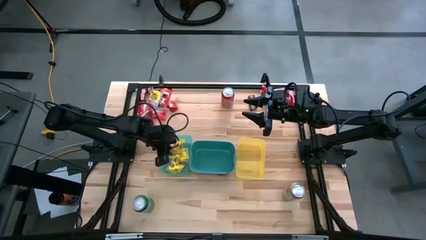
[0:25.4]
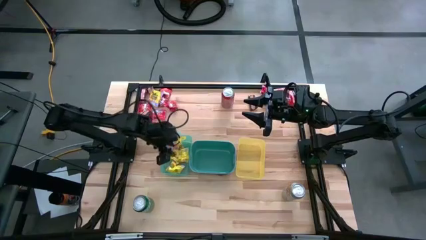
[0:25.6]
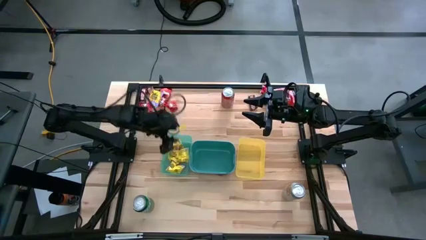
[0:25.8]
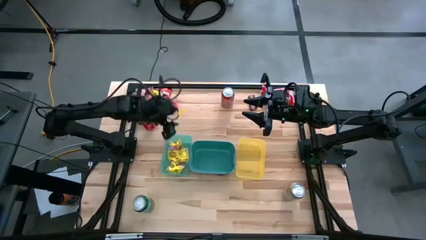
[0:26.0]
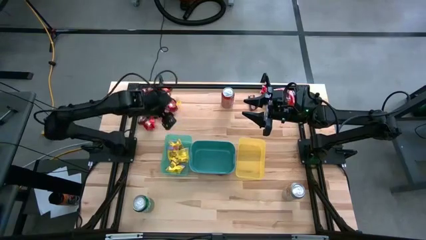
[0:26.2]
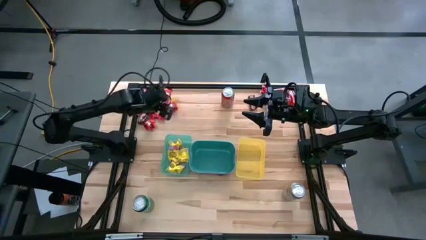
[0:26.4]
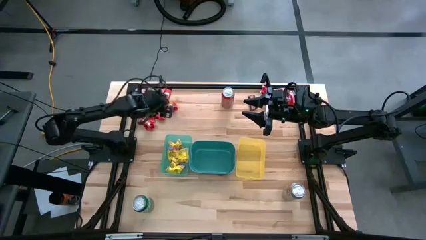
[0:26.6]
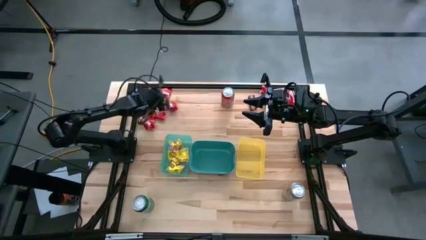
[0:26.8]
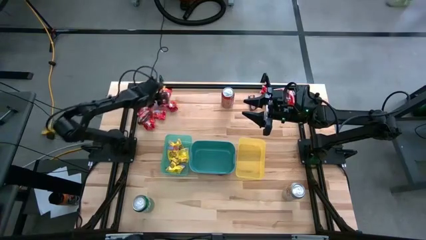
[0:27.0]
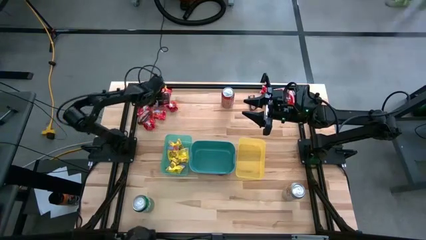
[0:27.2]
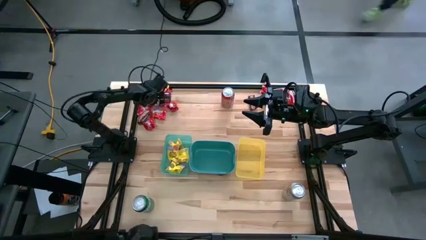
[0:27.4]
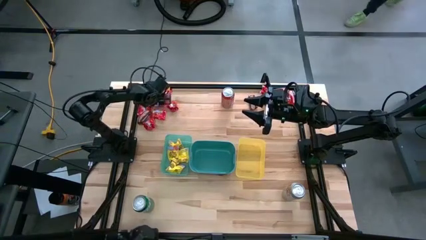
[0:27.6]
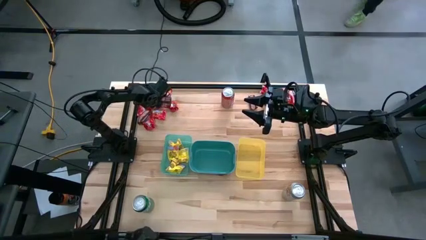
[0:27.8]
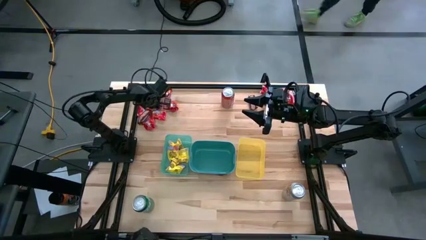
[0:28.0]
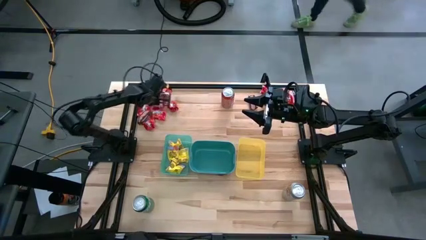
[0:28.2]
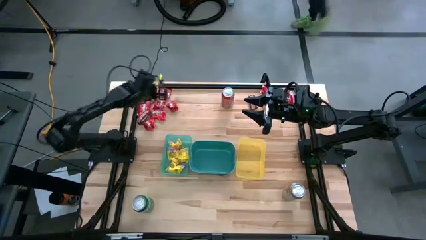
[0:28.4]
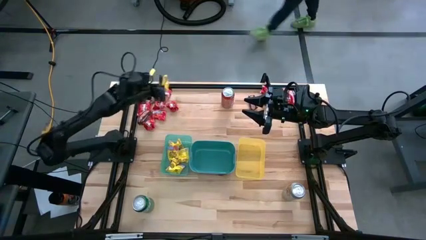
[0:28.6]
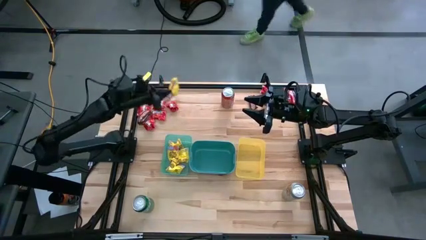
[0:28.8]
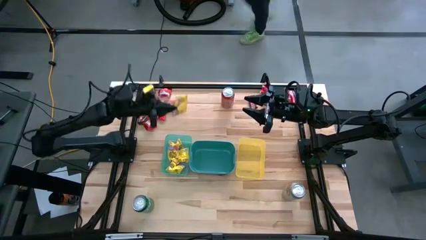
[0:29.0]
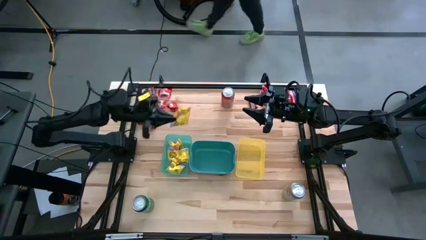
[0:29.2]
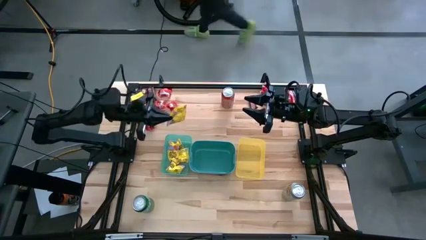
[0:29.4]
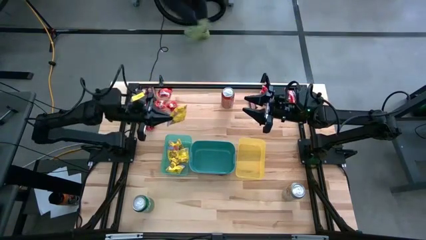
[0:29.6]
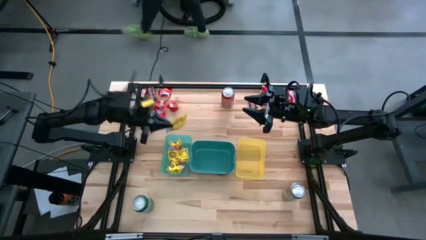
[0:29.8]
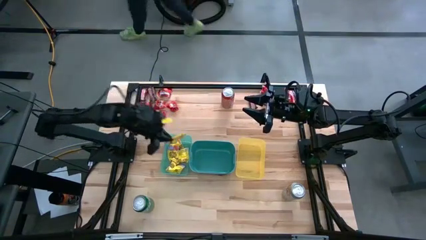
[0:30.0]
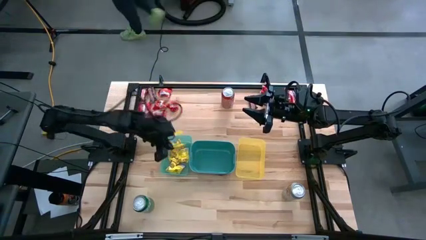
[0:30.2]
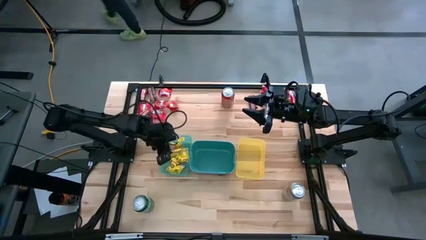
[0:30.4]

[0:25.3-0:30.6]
Task: Sort candy
Put the yellow candy into the light green bin

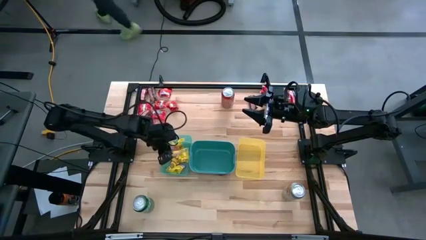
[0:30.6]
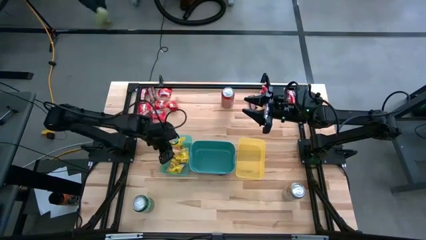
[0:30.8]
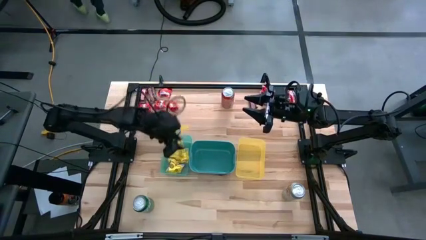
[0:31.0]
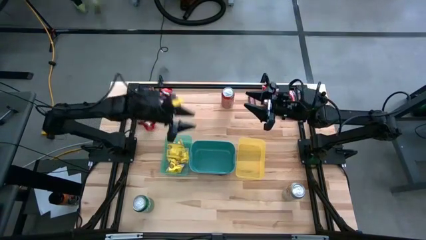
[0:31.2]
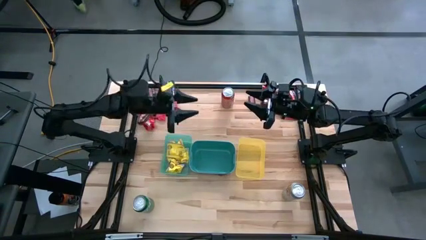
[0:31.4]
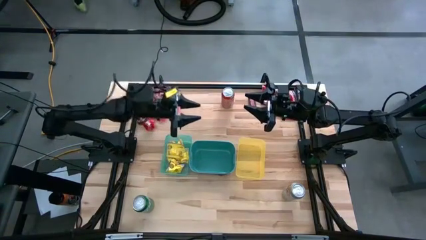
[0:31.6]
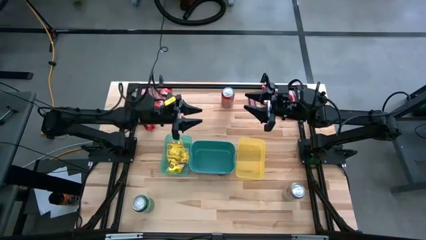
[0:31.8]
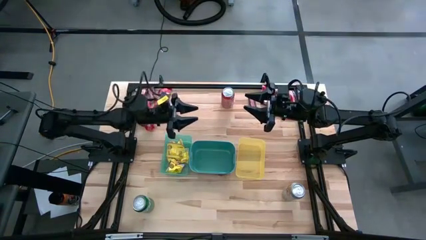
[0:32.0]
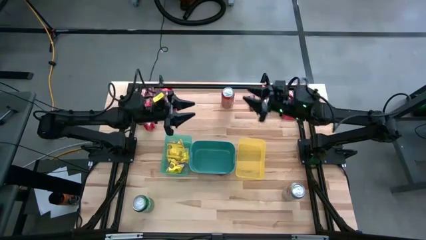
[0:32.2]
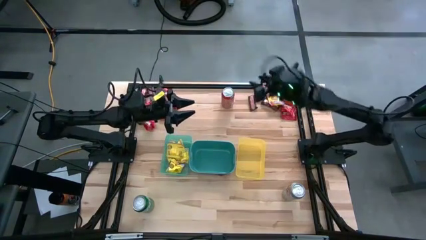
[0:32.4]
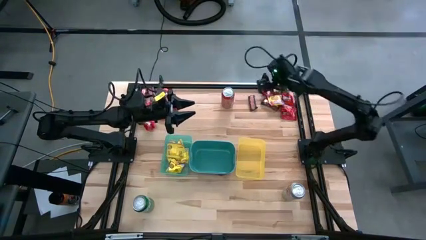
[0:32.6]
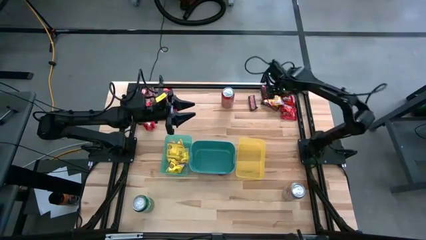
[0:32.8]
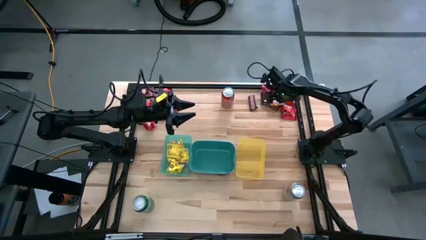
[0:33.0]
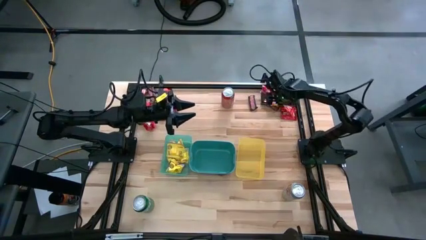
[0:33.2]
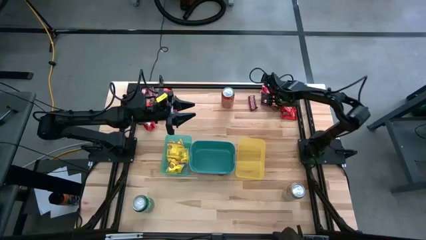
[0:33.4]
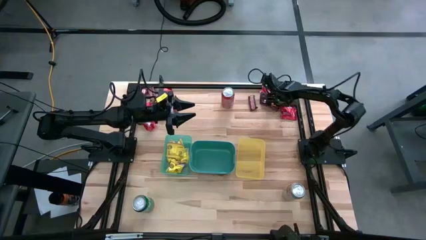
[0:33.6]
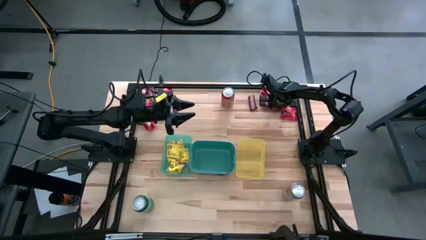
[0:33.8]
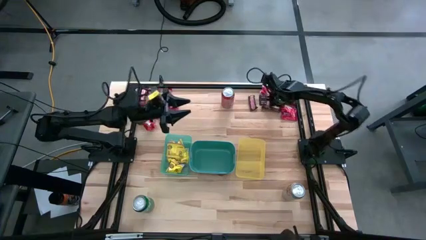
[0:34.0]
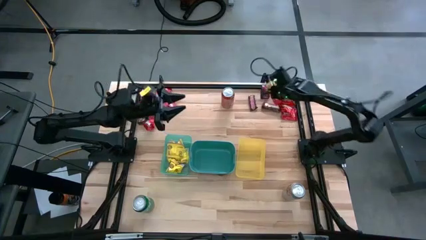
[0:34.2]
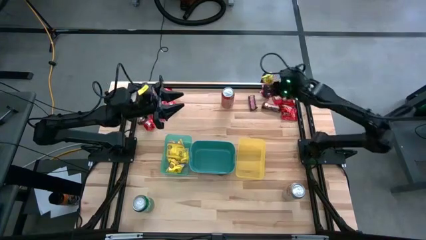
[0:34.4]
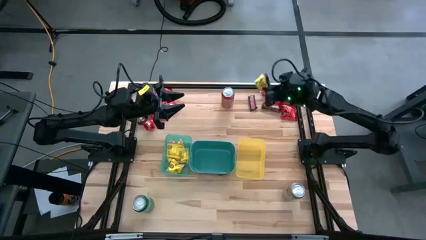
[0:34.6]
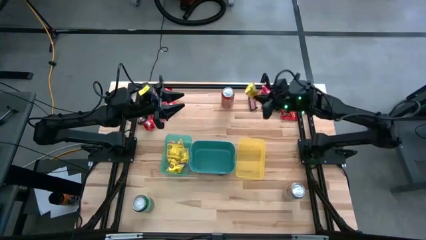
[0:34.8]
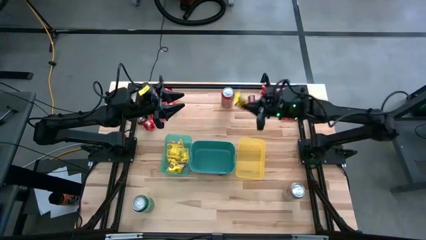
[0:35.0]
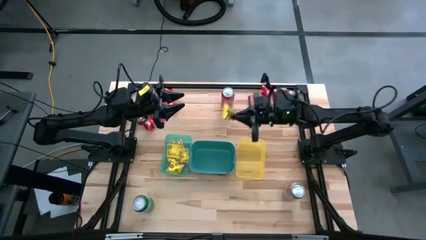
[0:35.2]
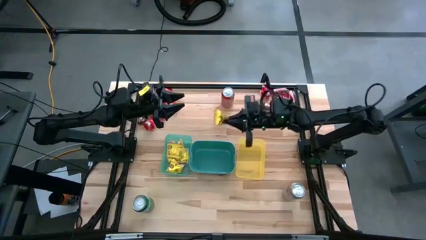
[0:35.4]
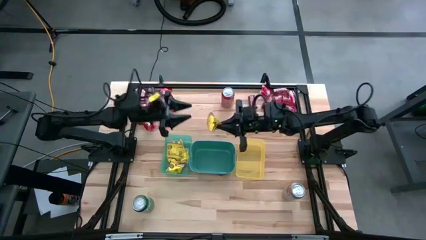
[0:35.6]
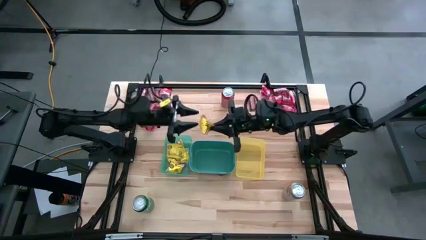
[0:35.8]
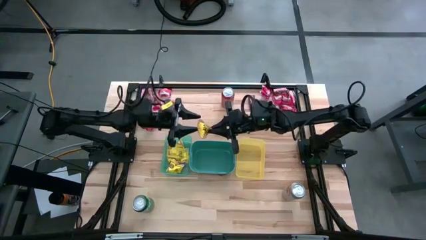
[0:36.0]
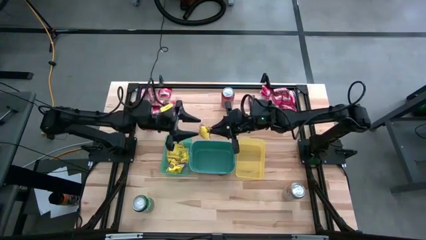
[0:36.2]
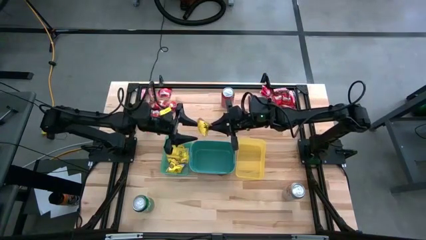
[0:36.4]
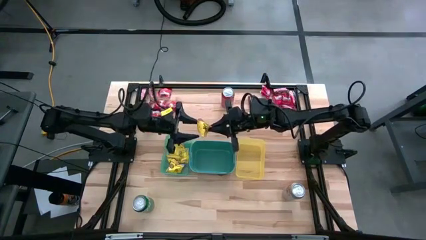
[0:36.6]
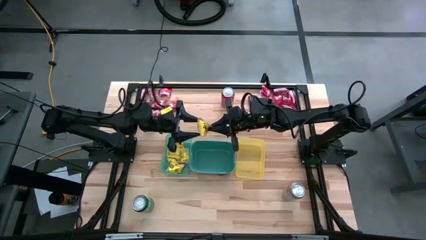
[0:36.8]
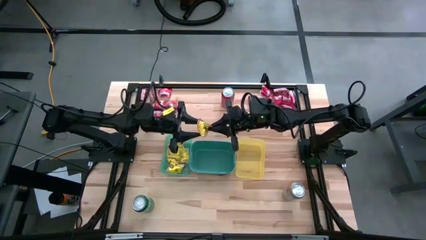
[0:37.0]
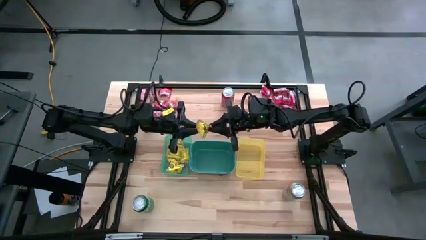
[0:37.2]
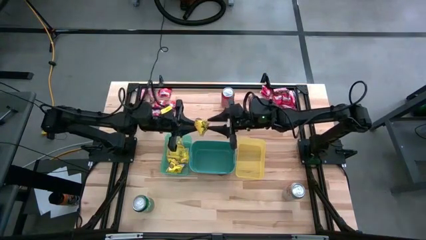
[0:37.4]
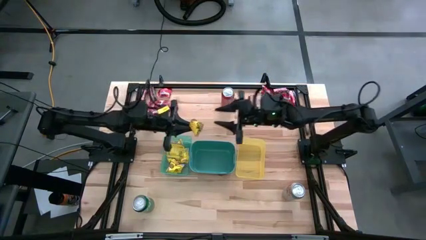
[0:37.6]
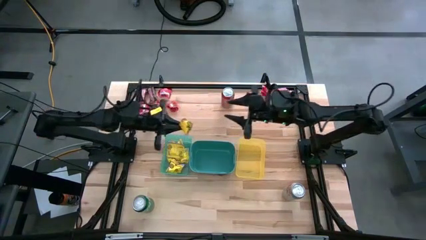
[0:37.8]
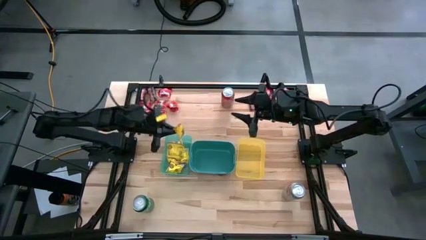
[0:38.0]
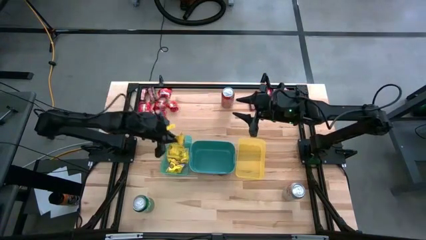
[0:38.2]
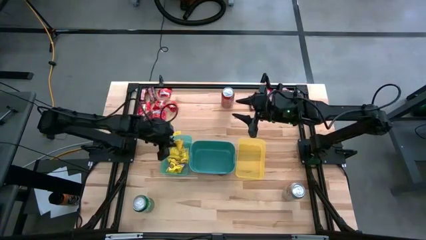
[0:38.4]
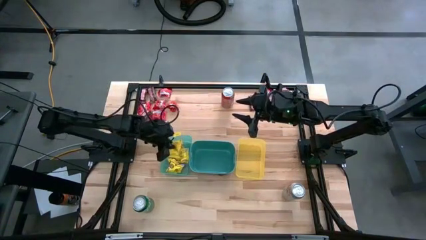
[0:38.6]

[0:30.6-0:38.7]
Put the yellow candy into the light green bin

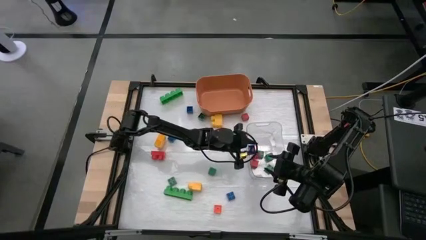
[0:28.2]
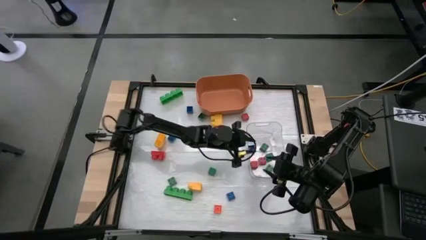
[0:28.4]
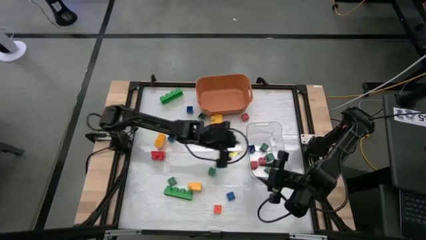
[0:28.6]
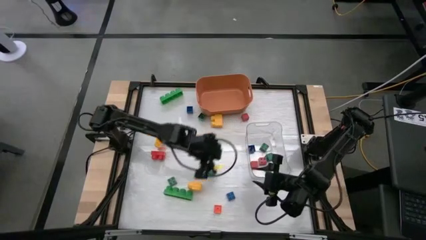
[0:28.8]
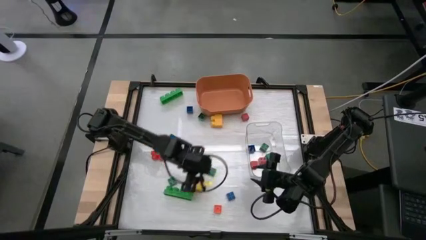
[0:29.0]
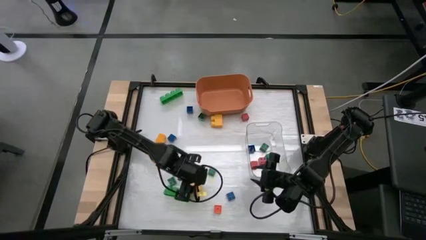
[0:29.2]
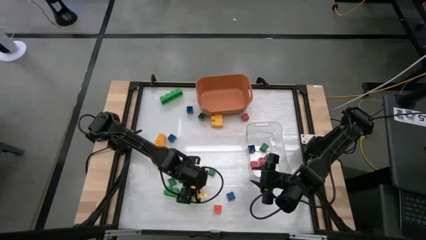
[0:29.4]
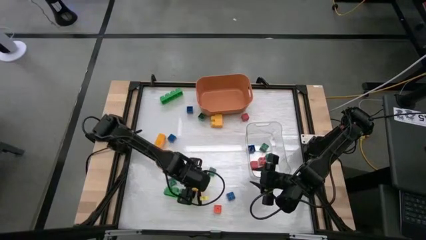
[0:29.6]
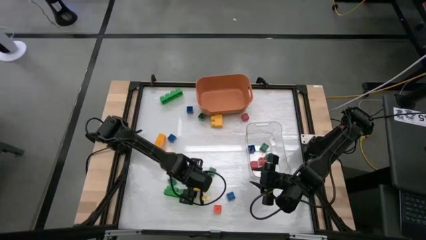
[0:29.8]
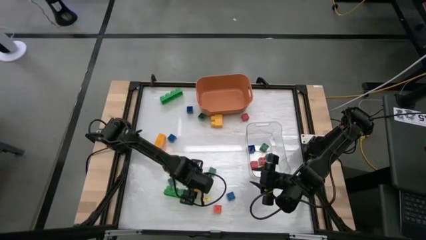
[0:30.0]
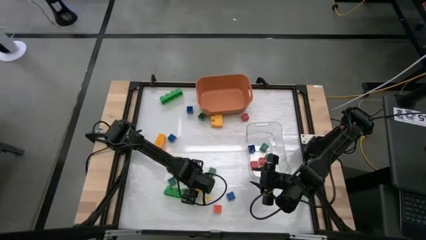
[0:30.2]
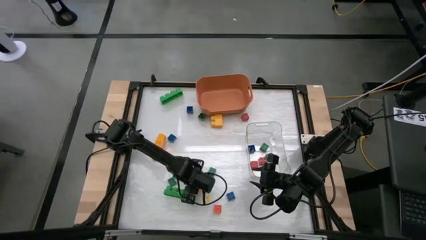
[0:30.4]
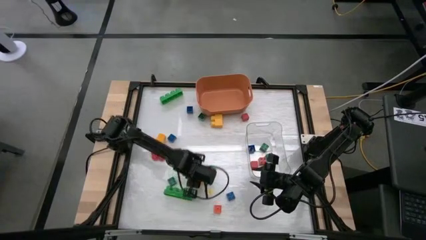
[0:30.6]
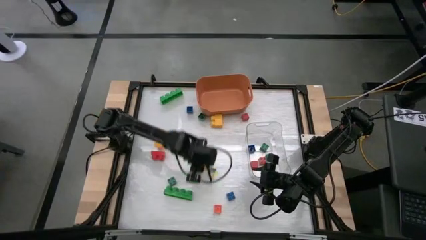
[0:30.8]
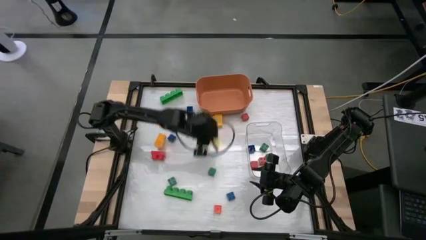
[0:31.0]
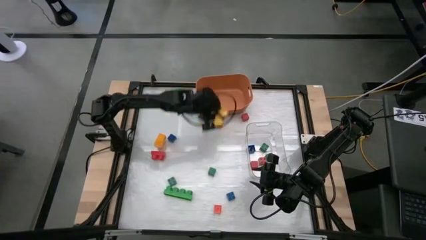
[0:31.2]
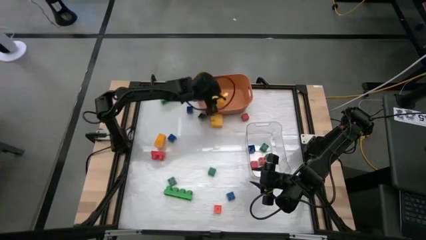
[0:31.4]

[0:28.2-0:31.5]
Task: Sort blocks by size
Put the big yellow game piece into the orange bin
